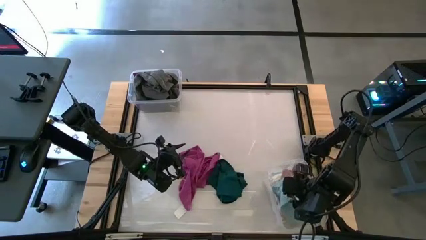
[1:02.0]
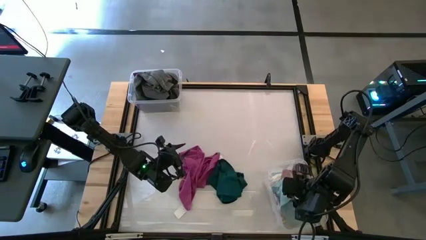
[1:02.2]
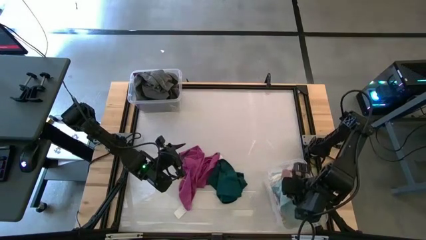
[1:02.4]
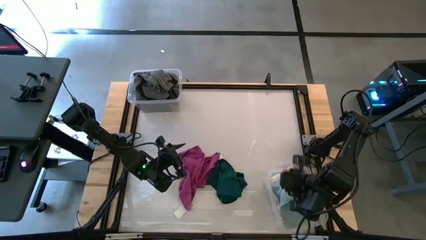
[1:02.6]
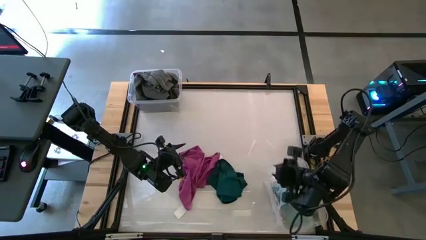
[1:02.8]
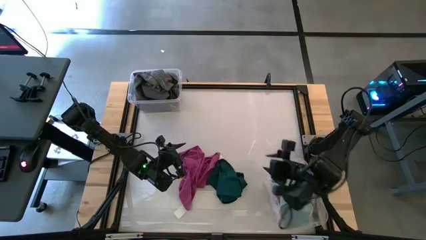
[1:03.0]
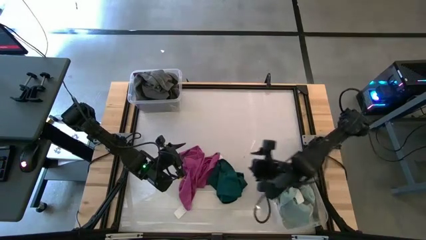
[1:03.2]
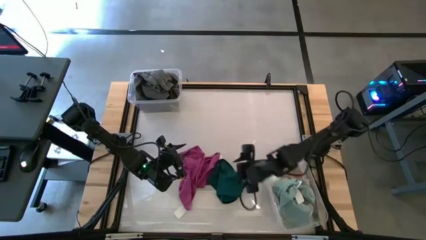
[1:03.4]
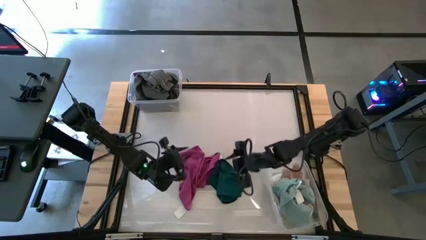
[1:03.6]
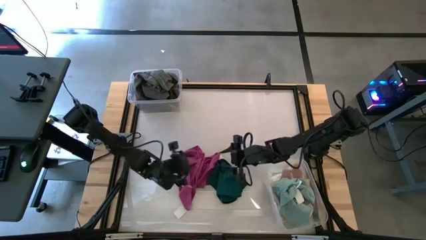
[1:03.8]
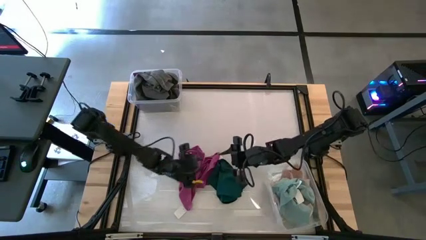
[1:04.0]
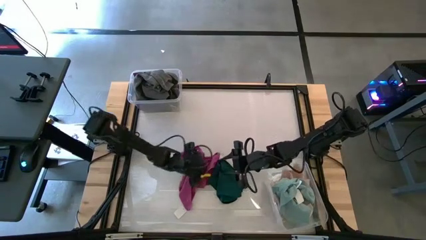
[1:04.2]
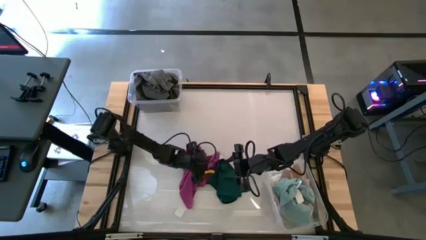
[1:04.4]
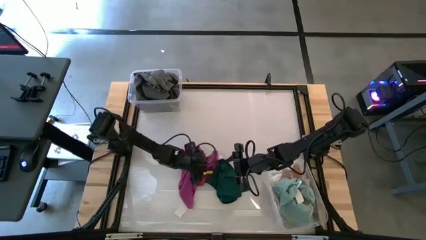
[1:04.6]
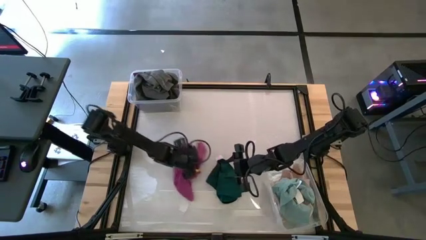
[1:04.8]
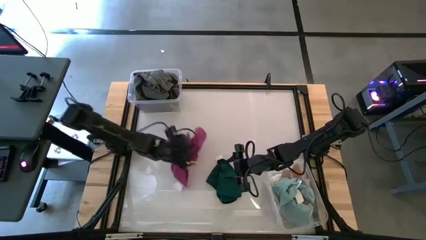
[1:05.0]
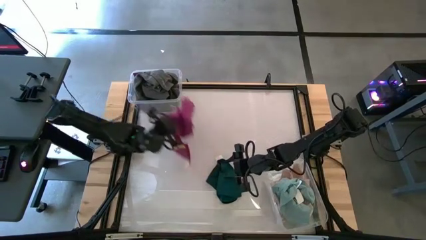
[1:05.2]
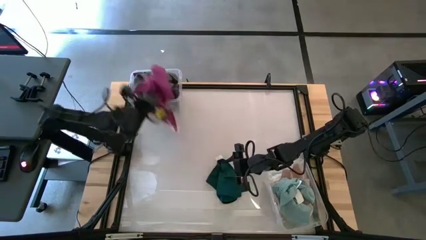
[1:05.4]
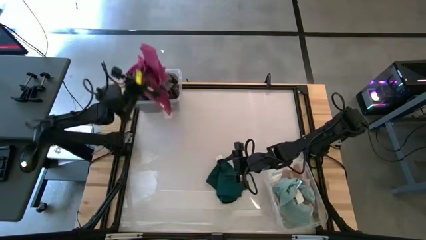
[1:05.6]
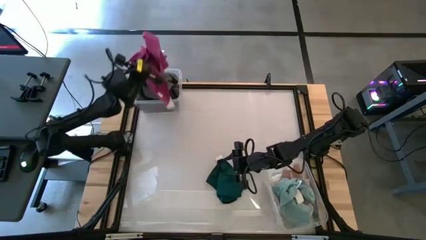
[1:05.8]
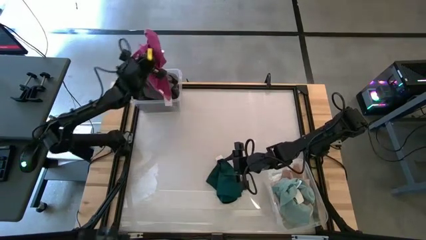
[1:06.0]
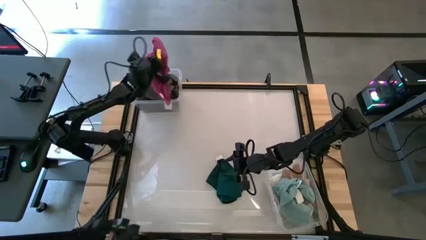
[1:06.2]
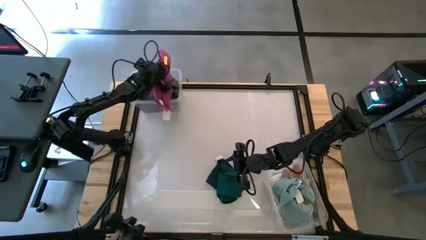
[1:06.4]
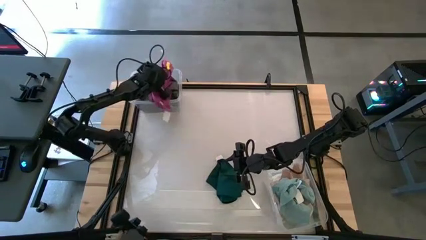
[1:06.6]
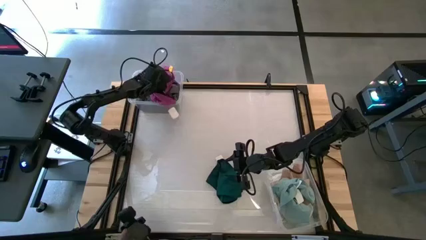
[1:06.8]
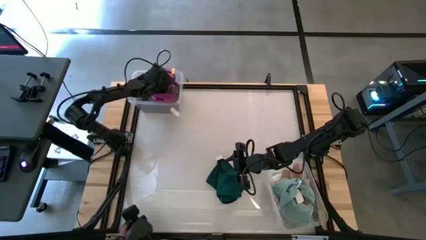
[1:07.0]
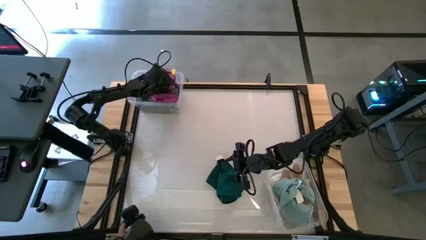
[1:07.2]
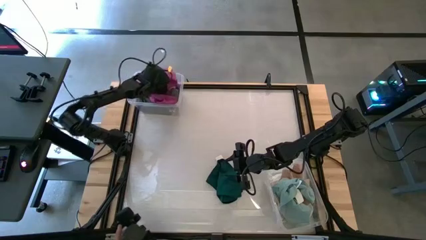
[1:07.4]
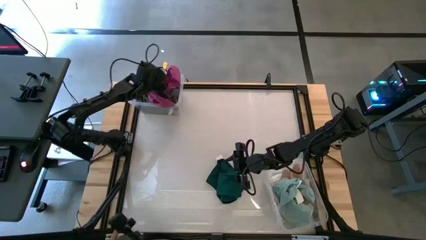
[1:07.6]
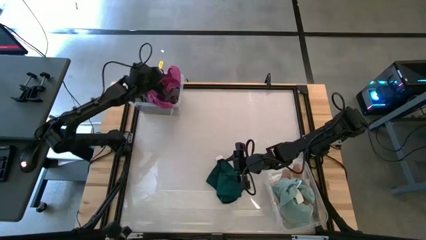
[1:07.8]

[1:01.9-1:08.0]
Task: Sort microfiber towel by color & place in baskets
Put the pink towel into the top transparent bin

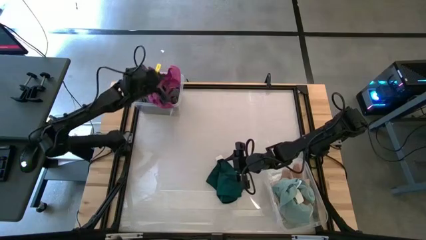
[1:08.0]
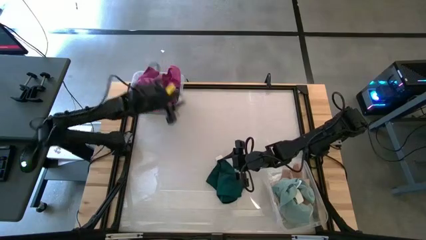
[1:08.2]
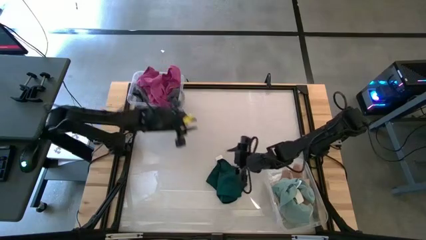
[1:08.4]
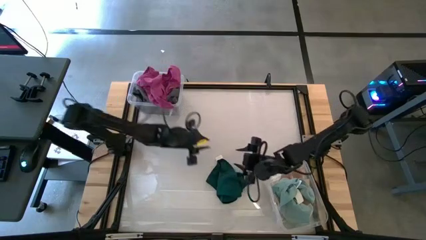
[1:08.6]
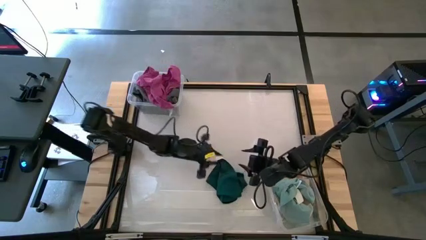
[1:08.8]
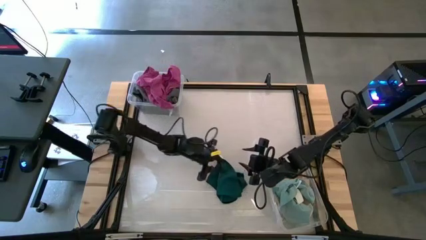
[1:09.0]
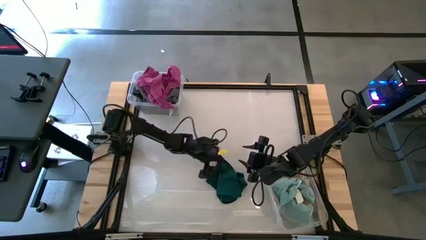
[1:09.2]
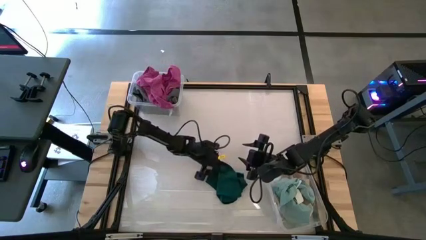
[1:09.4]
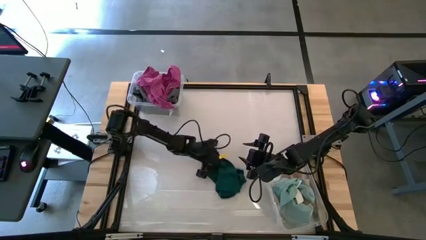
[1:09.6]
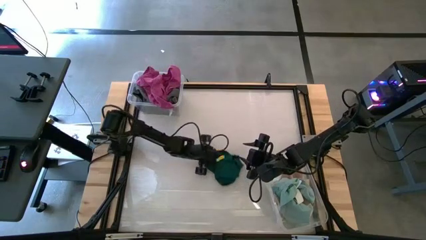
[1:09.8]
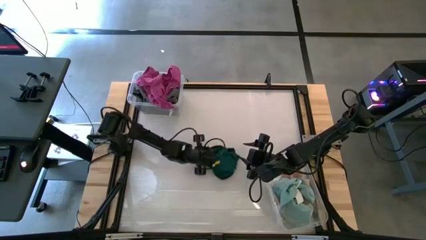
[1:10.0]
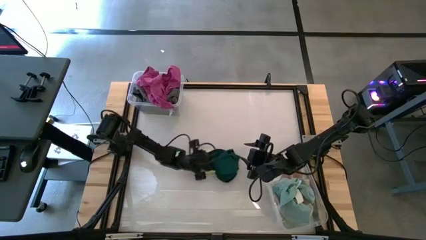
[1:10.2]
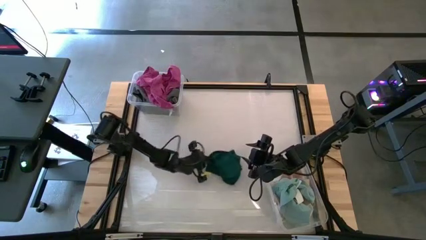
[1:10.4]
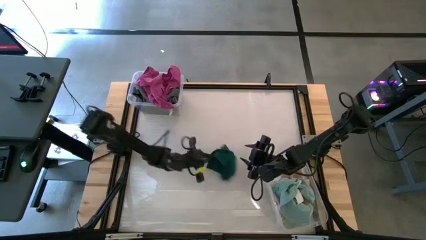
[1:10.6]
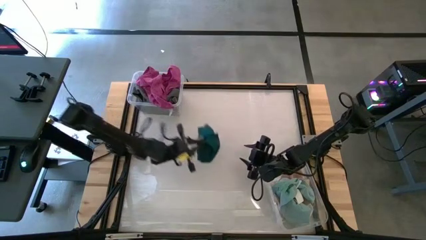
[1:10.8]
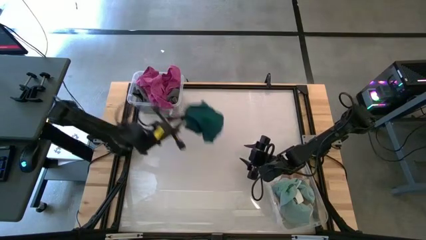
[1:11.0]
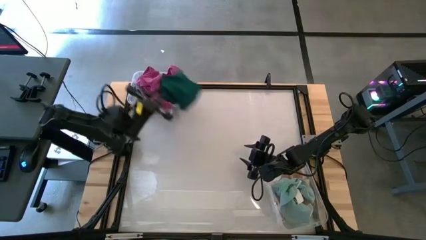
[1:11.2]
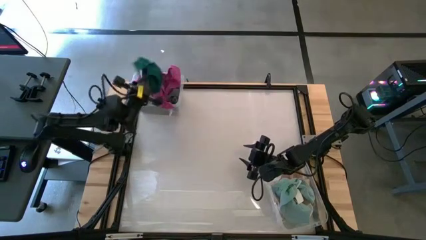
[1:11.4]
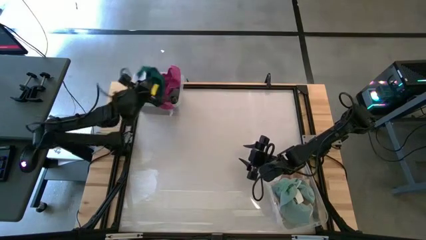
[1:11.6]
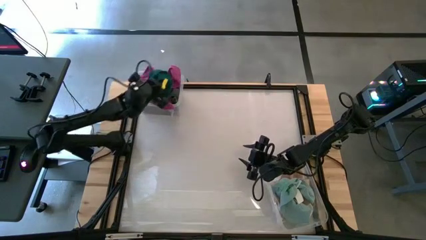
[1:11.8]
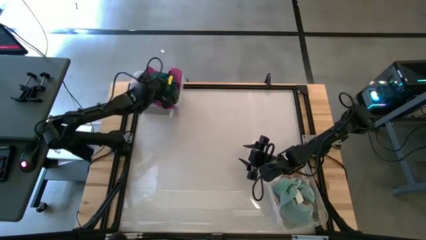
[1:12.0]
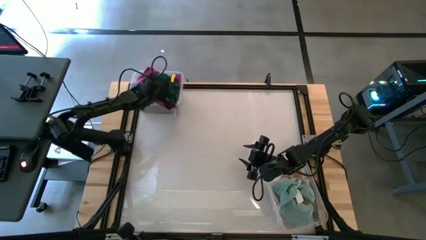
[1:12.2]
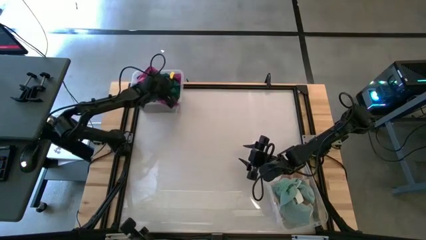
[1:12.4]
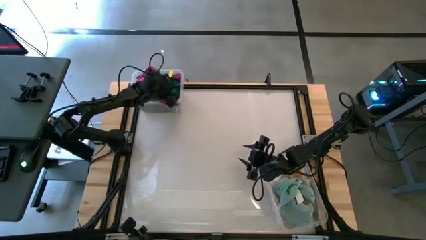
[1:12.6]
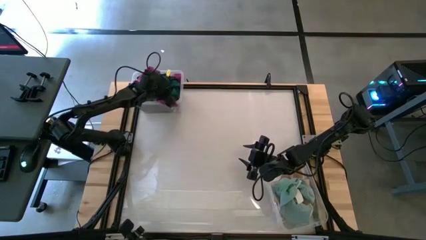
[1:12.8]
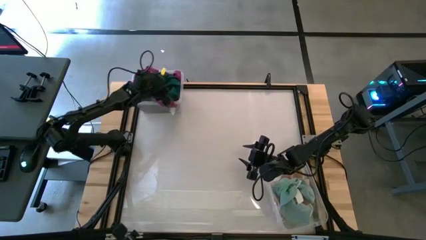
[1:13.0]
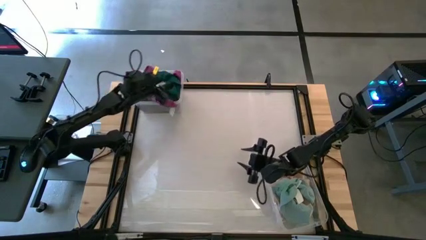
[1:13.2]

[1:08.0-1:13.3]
Put the dark green towel into the top transparent bin
